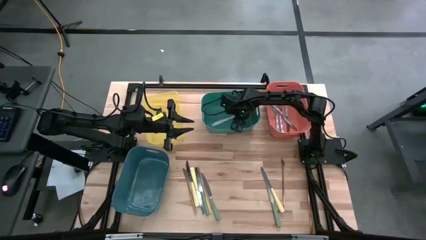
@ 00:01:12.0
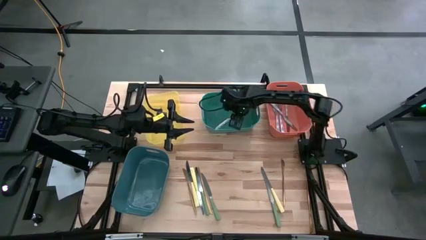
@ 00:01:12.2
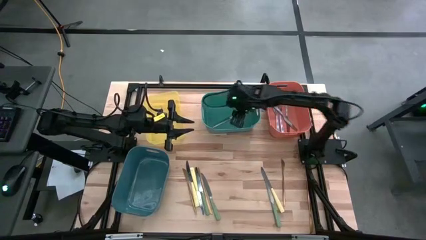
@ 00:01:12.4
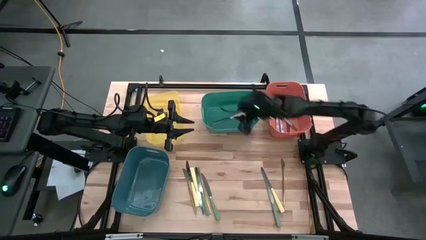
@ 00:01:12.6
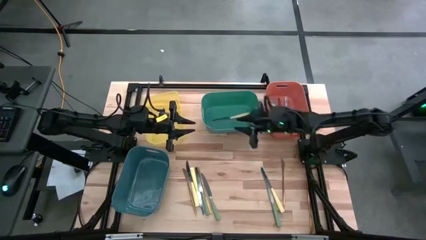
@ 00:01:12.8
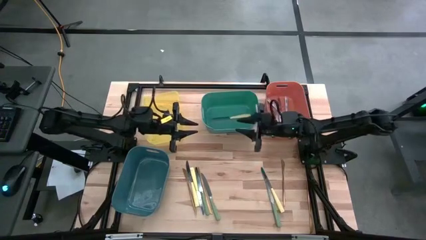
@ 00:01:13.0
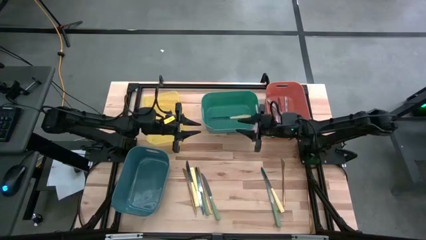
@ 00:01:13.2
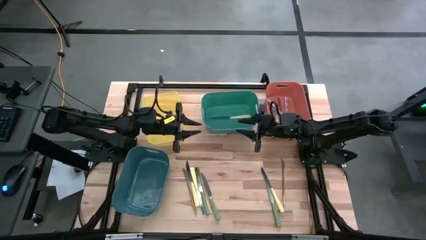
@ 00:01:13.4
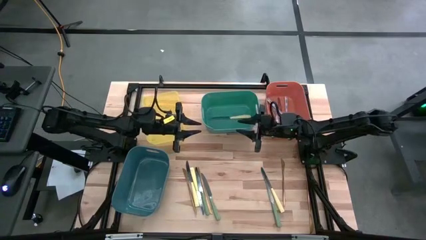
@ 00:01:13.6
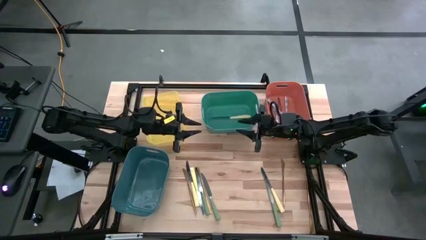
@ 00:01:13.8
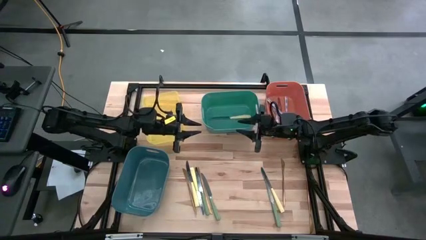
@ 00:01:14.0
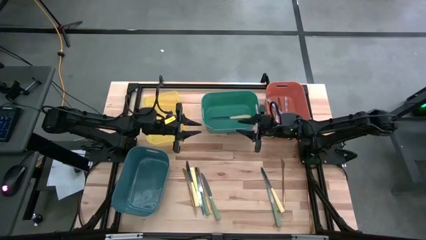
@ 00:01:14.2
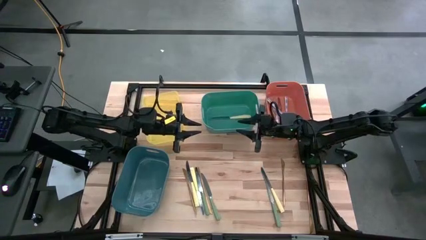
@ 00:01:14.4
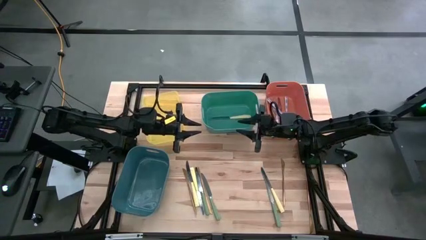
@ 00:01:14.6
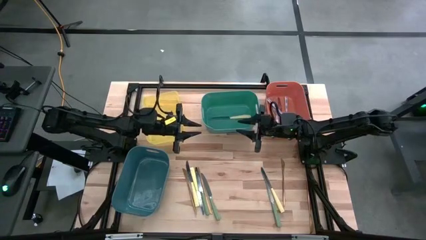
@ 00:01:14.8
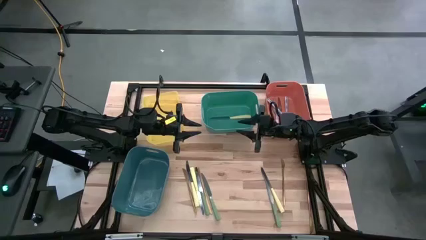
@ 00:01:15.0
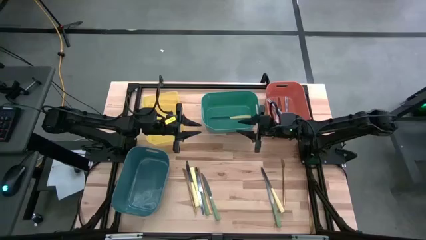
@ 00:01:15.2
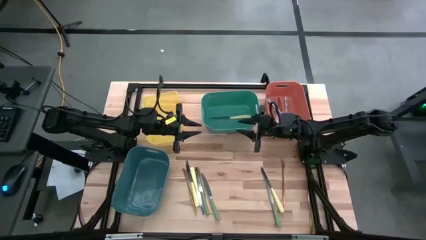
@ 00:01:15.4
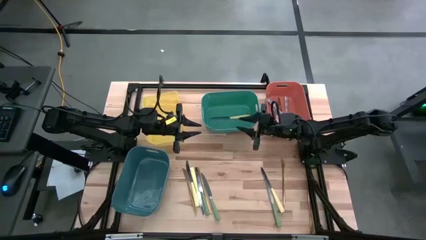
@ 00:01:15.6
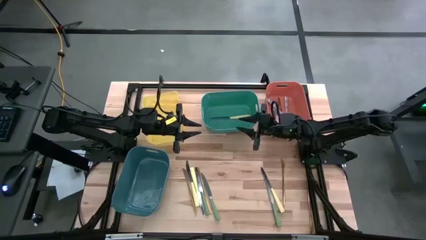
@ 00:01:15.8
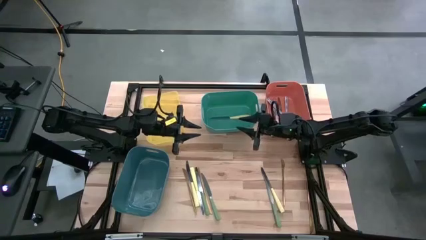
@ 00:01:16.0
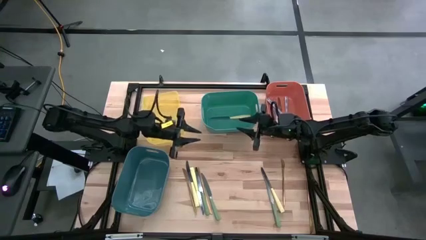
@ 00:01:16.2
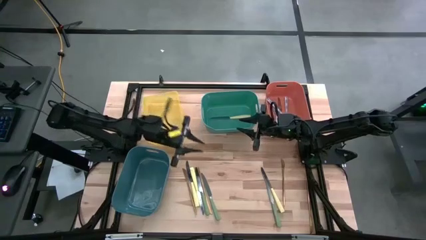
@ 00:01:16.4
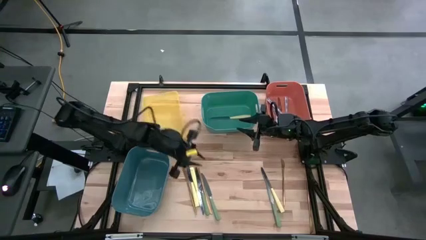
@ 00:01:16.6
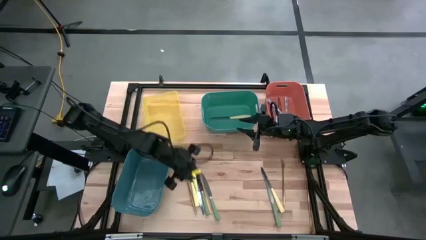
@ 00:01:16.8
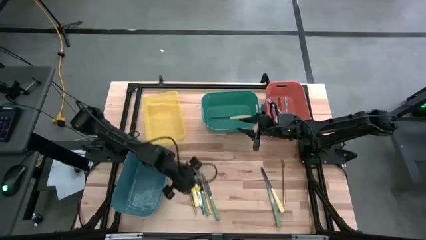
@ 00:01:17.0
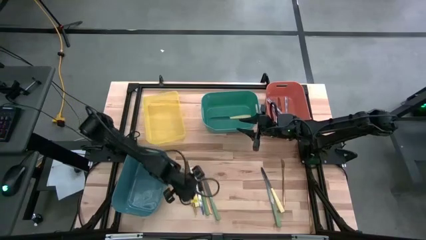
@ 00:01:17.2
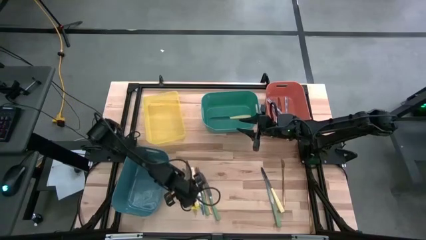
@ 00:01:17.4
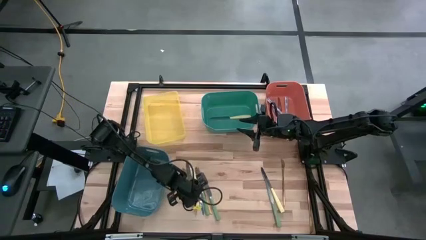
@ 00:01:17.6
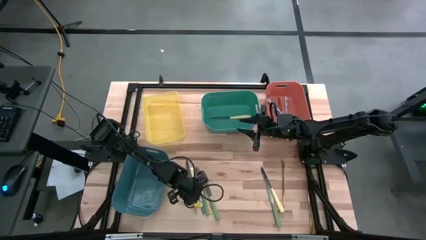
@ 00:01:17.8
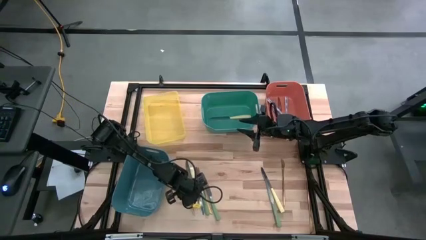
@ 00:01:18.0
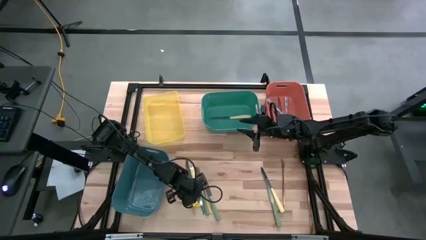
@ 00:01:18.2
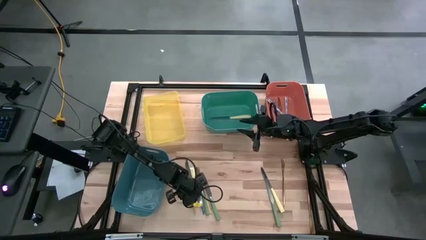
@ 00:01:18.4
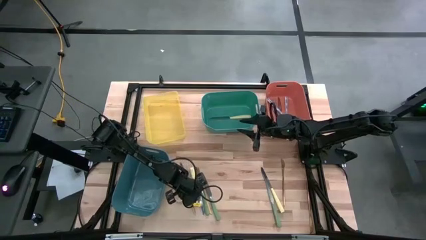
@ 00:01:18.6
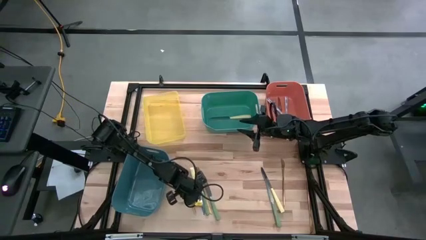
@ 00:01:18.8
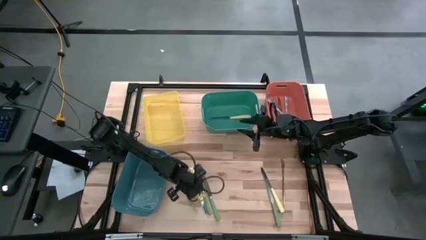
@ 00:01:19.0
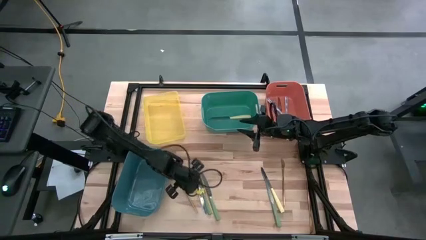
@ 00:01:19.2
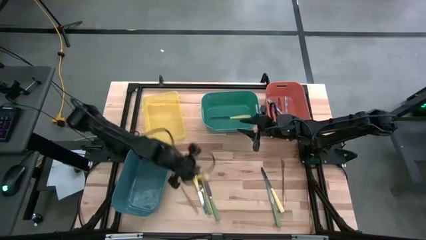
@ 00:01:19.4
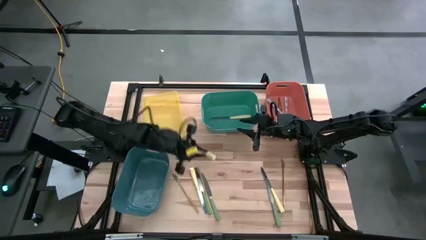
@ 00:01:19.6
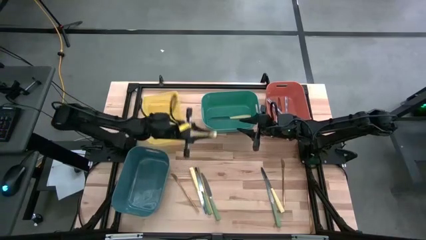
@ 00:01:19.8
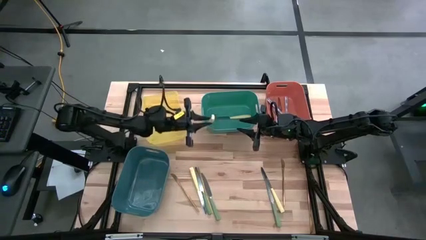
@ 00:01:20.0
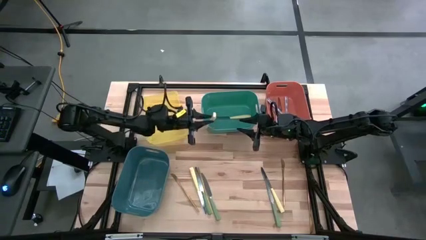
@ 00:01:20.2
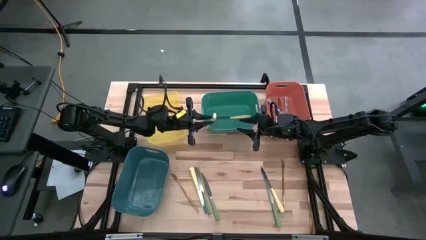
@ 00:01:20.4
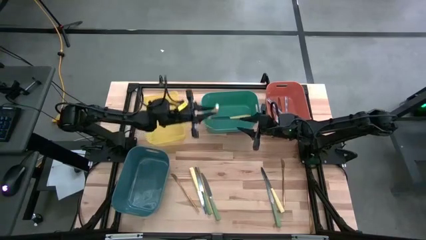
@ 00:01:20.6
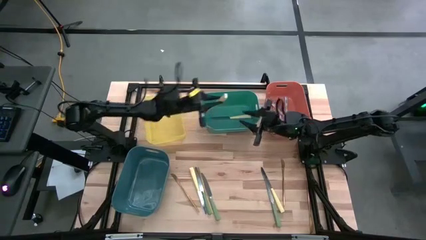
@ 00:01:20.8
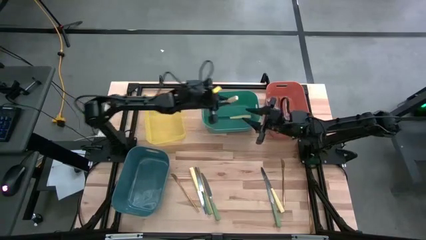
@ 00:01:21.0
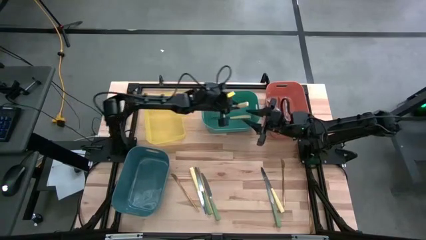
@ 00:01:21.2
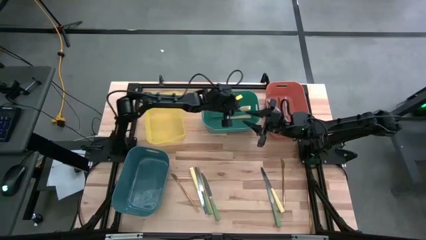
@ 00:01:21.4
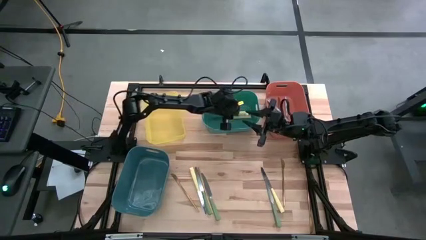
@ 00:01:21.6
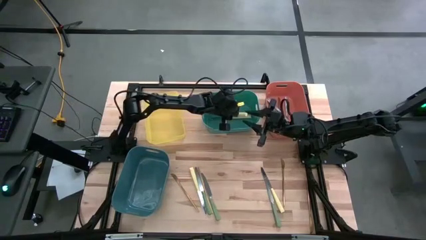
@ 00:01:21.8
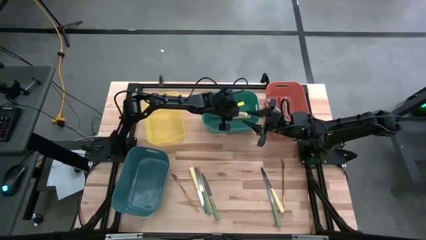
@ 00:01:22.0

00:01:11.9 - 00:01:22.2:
Task: Sort silverware by color (type)
Put the yellow knife into the green bin

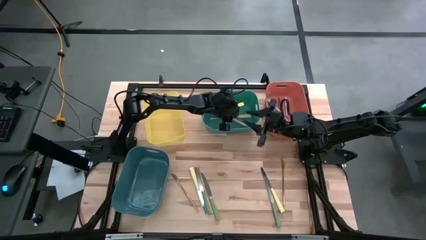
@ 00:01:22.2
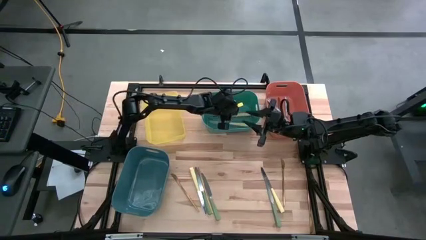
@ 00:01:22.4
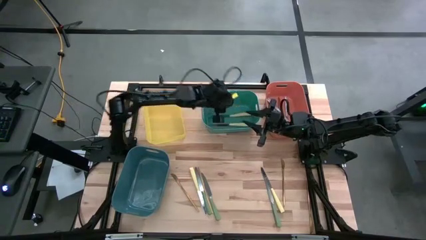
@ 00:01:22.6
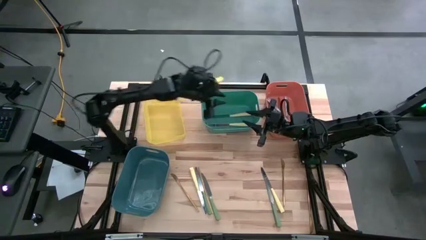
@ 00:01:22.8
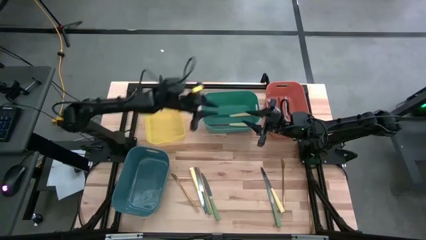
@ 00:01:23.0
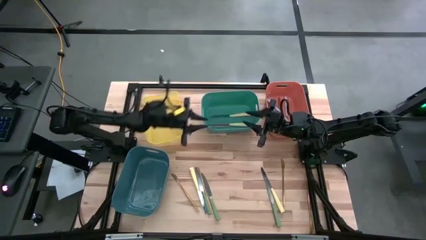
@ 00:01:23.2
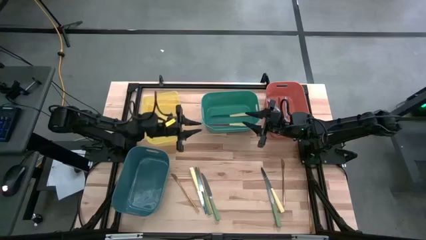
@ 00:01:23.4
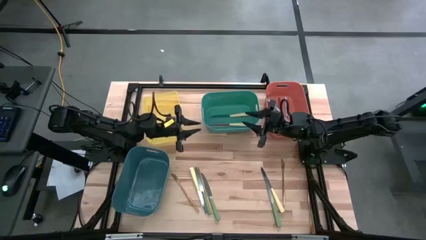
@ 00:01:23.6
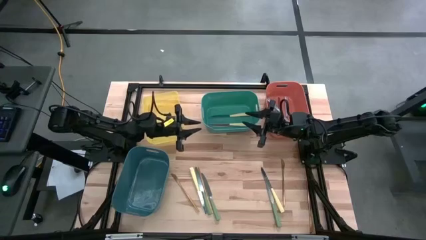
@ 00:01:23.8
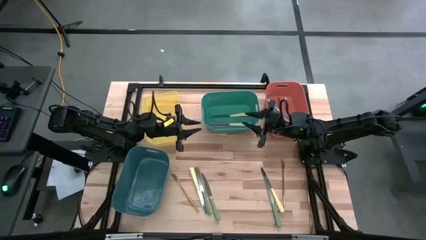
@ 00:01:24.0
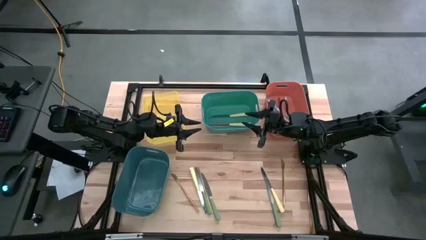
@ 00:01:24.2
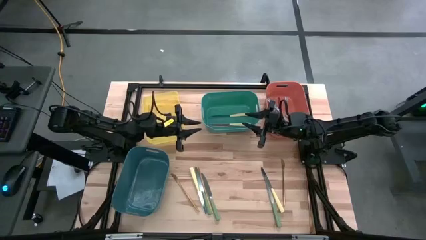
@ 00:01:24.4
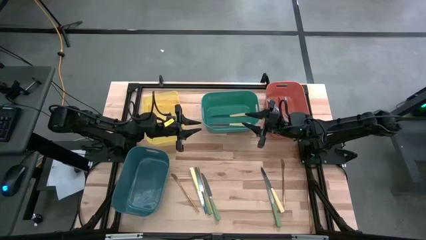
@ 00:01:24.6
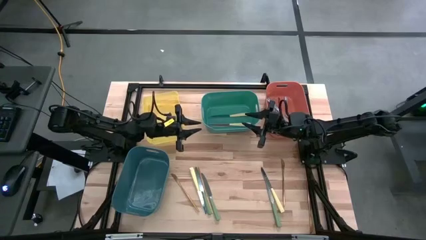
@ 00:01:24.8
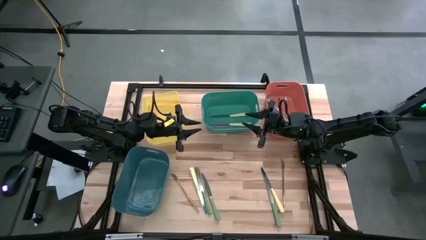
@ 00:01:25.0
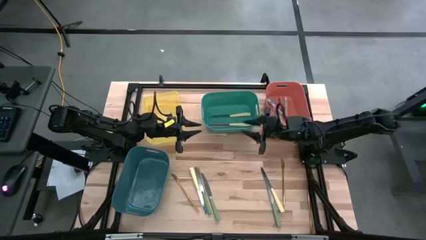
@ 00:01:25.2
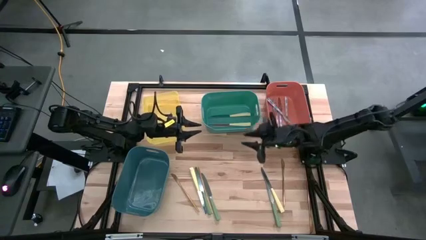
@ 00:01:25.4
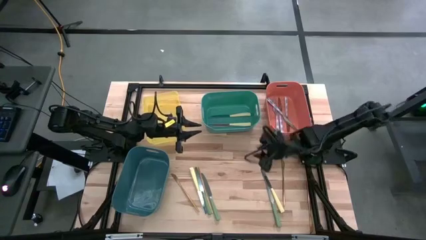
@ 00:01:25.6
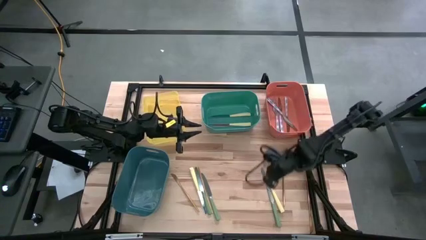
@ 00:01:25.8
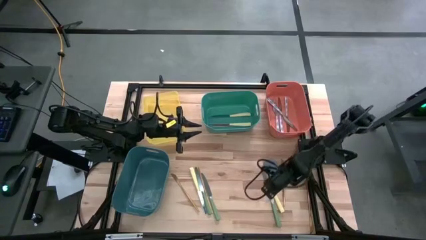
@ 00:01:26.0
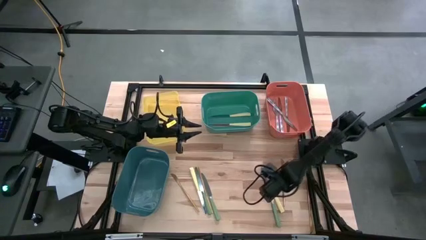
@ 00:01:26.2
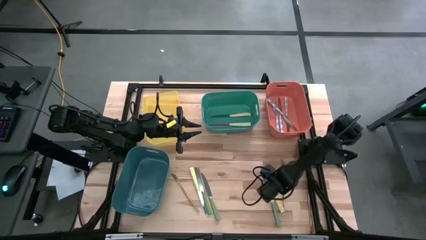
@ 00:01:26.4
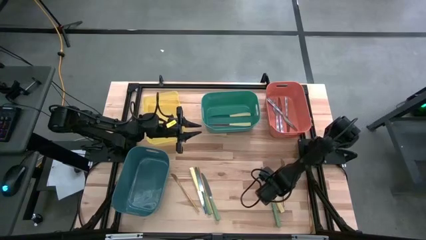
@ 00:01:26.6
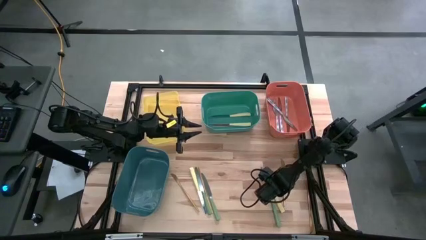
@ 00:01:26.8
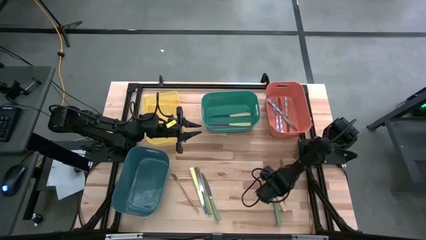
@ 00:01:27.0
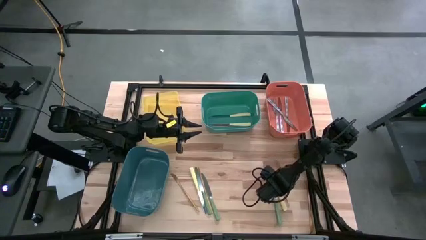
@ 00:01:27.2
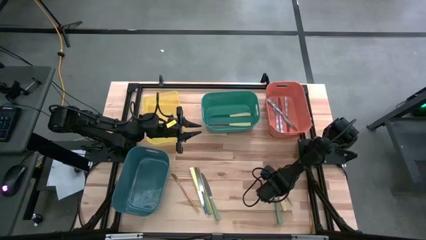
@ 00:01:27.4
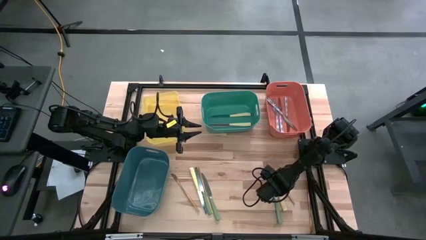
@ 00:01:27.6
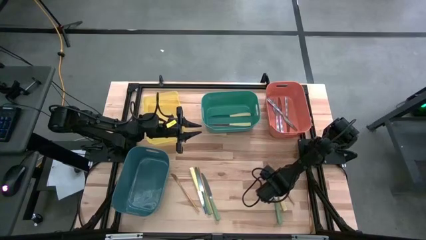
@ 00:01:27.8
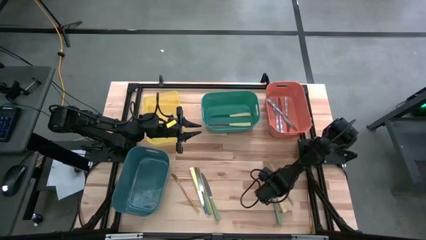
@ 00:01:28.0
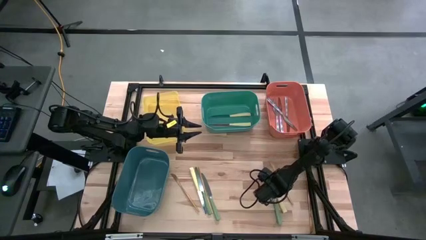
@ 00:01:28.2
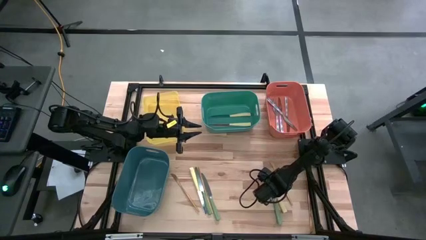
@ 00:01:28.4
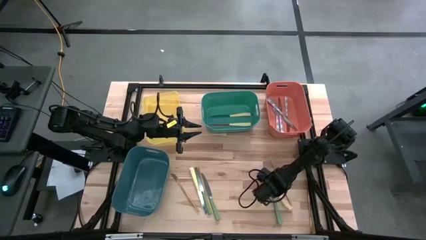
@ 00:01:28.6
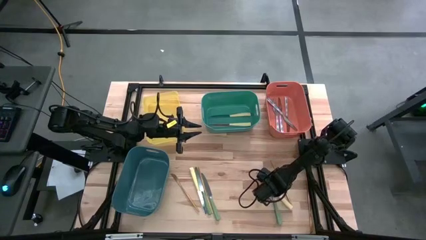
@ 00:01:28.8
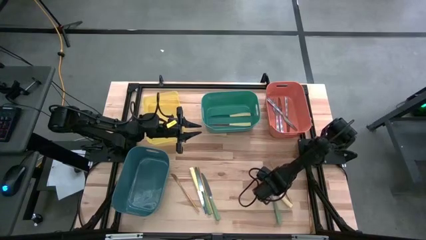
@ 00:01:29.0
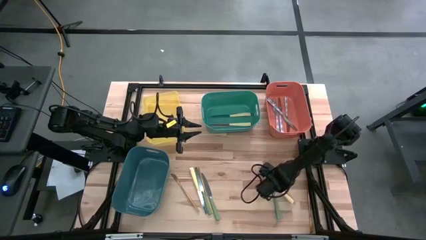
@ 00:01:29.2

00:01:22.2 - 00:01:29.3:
Put the yellow knife into the green bin
